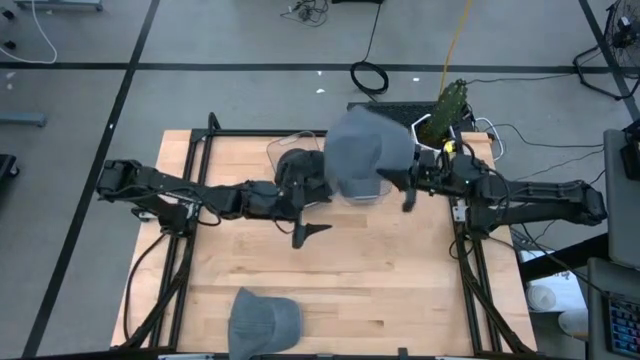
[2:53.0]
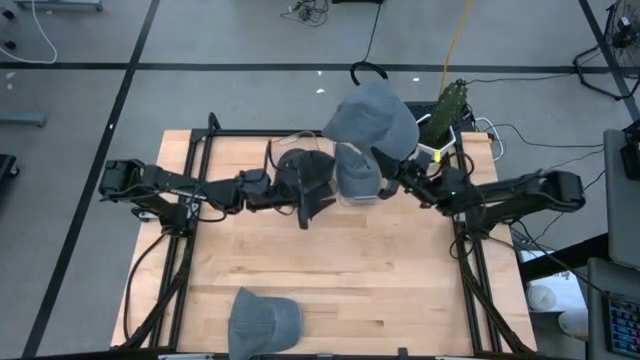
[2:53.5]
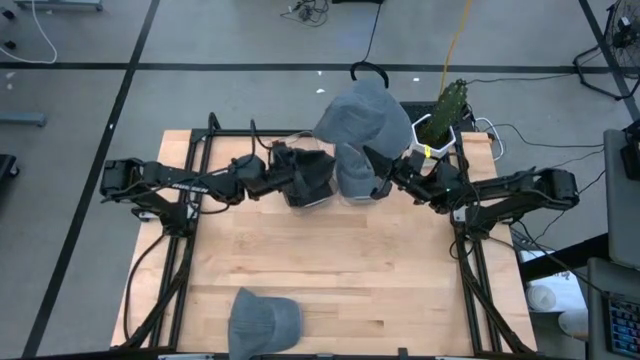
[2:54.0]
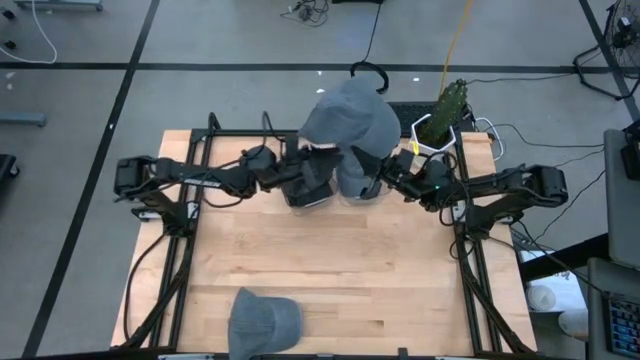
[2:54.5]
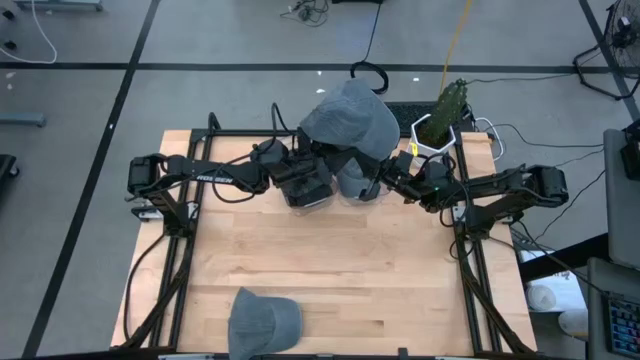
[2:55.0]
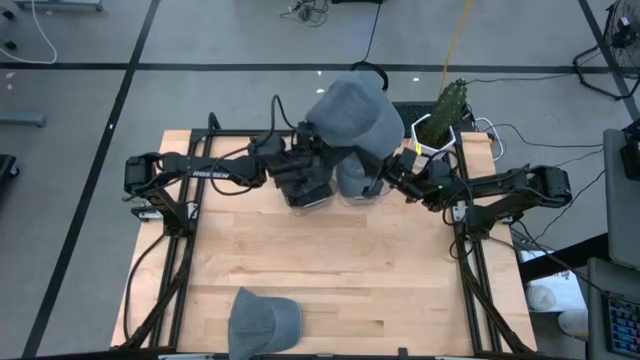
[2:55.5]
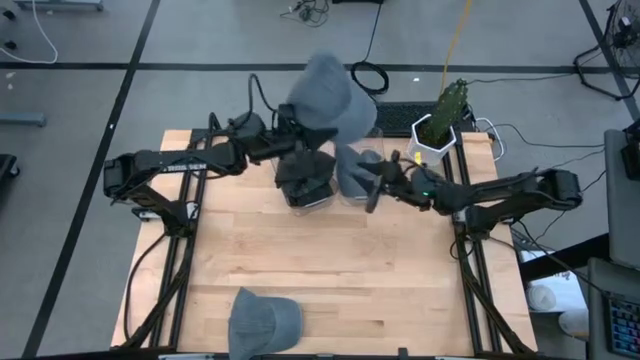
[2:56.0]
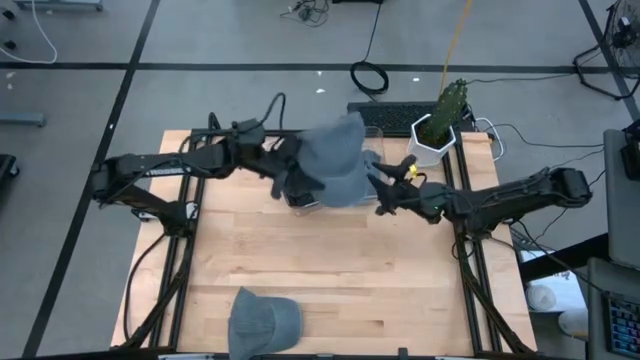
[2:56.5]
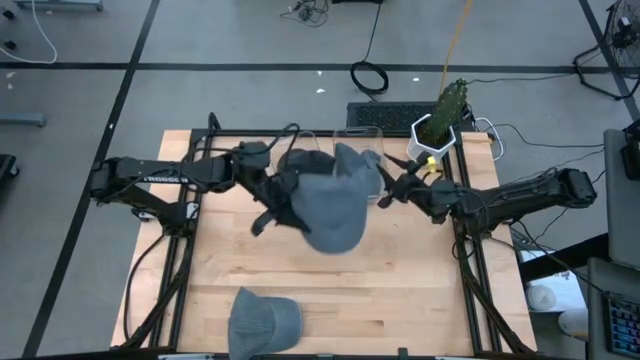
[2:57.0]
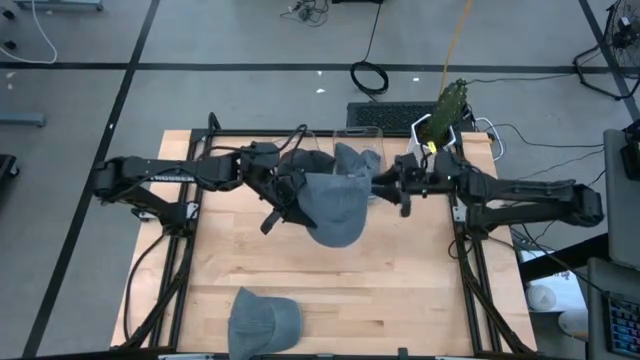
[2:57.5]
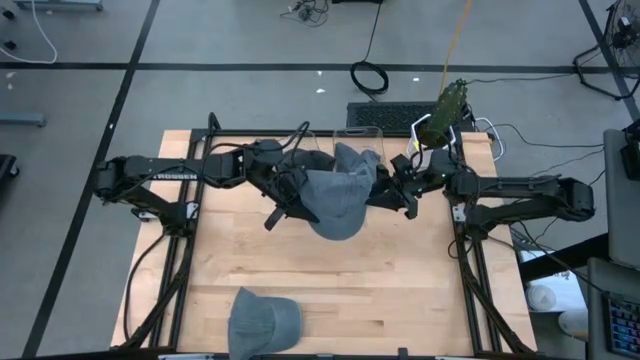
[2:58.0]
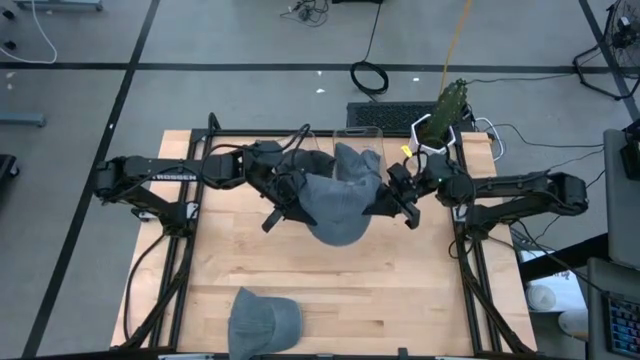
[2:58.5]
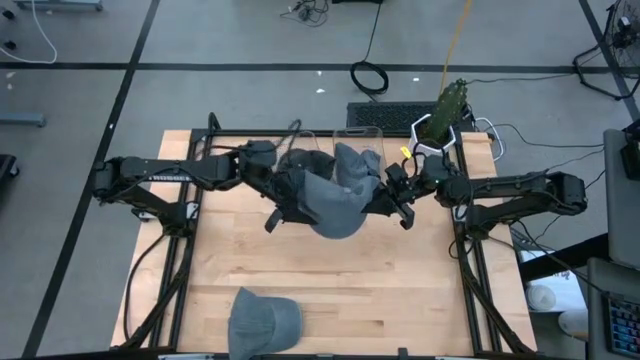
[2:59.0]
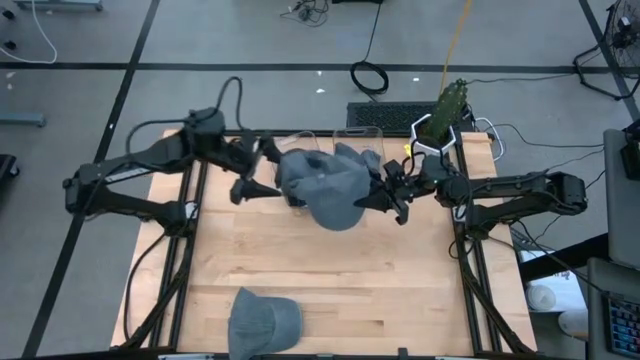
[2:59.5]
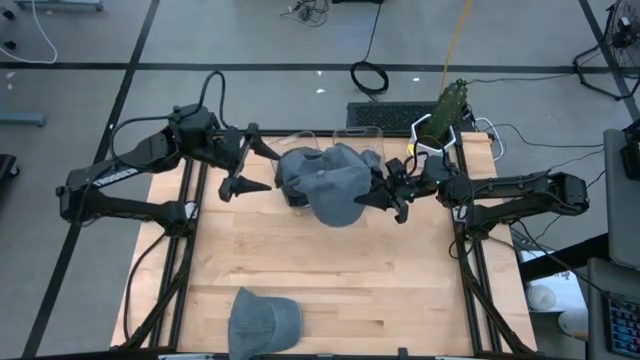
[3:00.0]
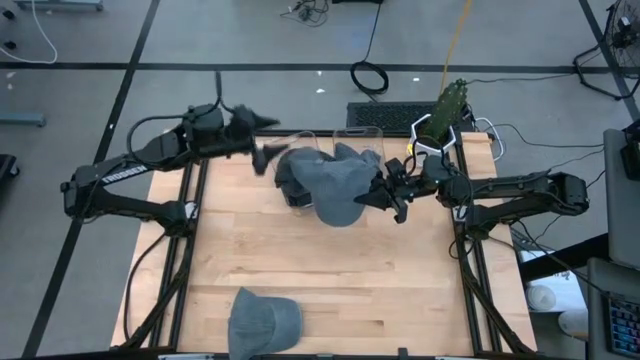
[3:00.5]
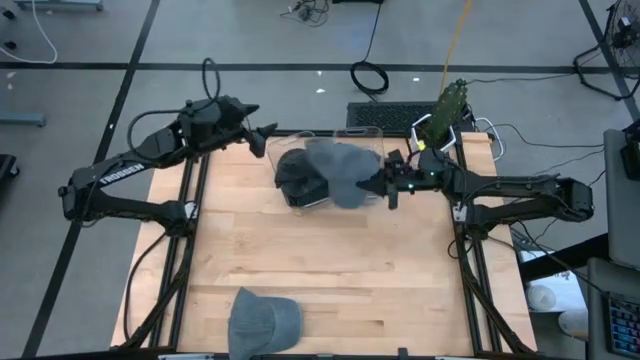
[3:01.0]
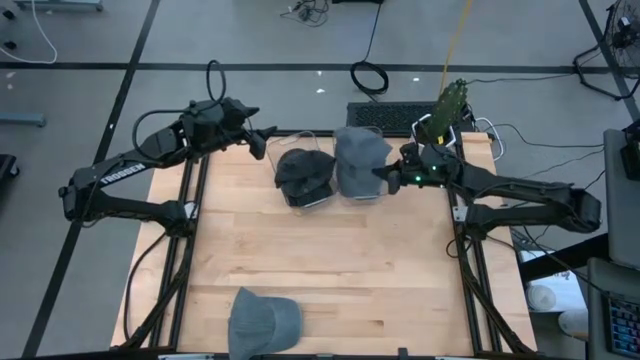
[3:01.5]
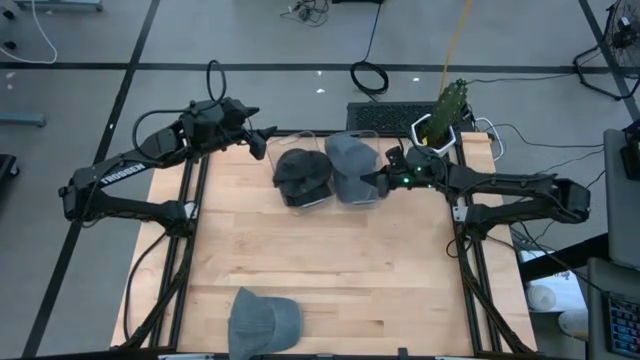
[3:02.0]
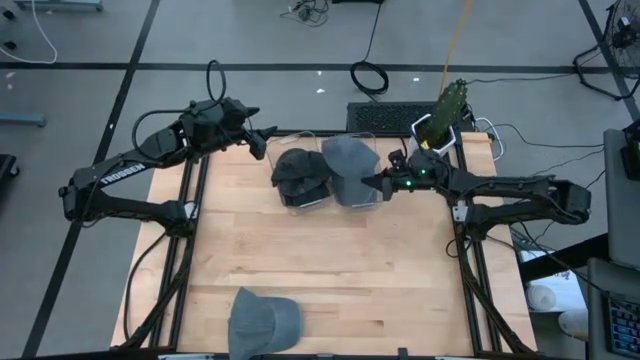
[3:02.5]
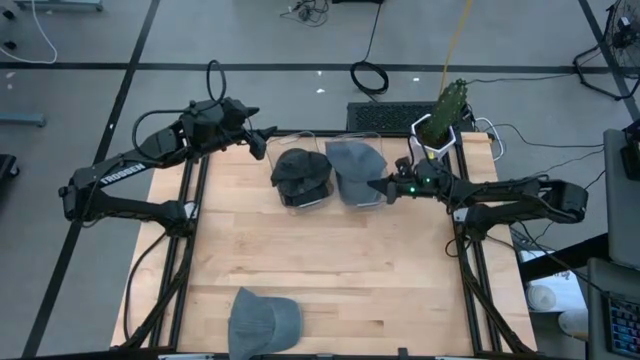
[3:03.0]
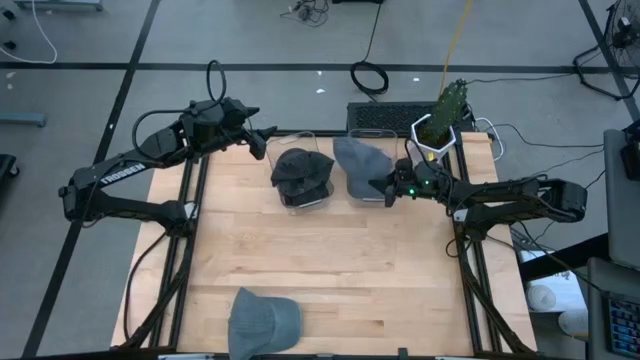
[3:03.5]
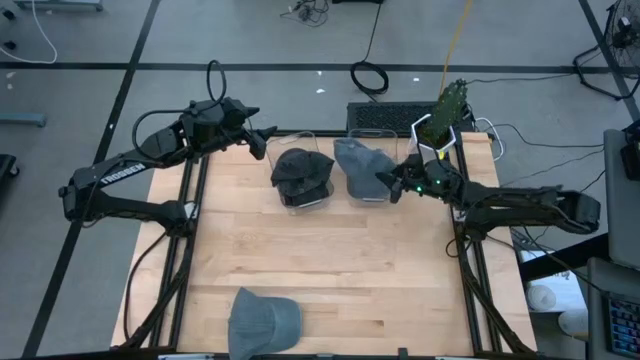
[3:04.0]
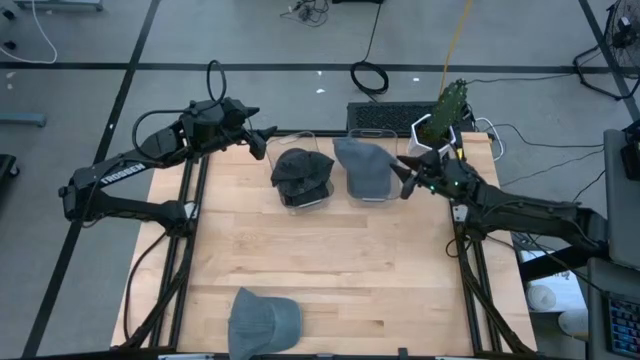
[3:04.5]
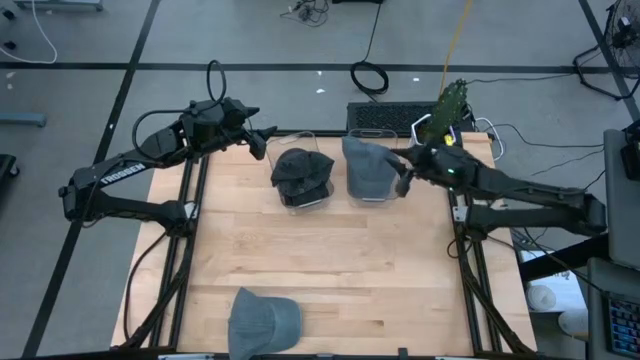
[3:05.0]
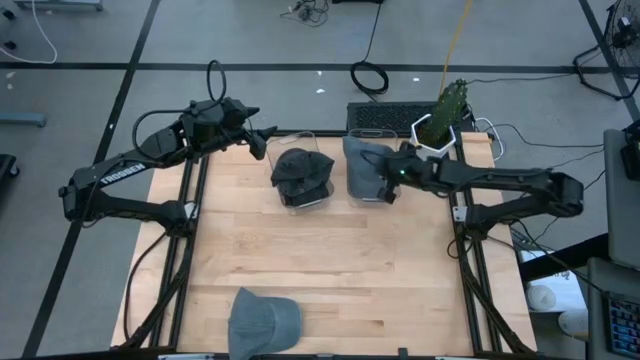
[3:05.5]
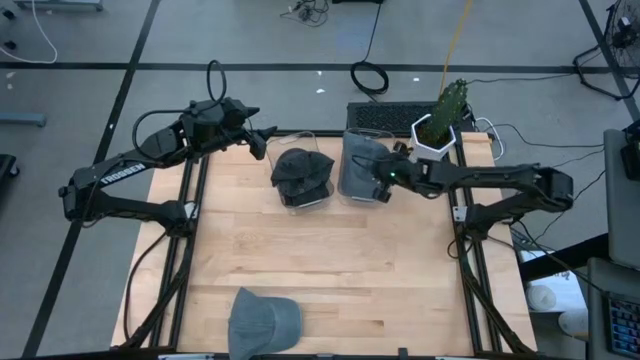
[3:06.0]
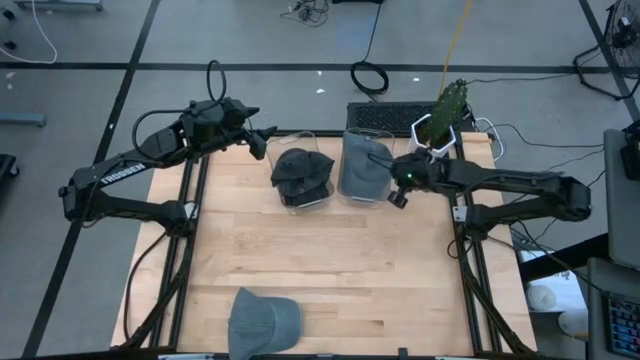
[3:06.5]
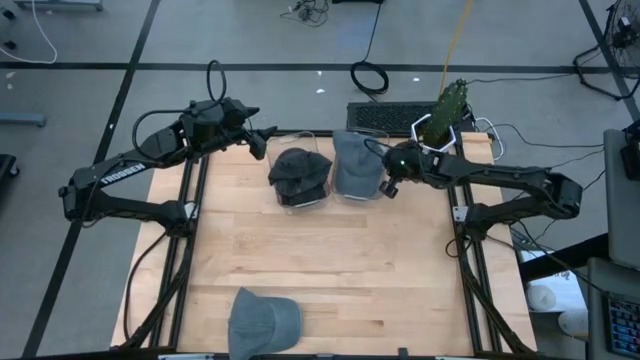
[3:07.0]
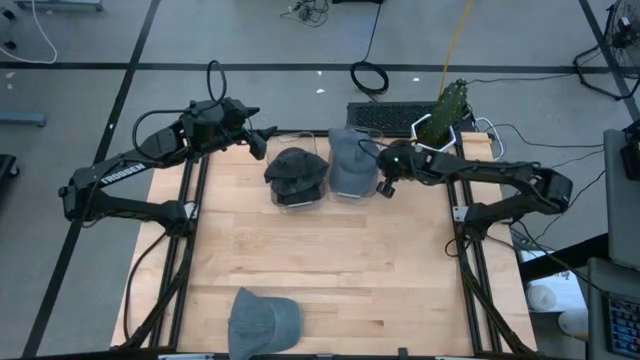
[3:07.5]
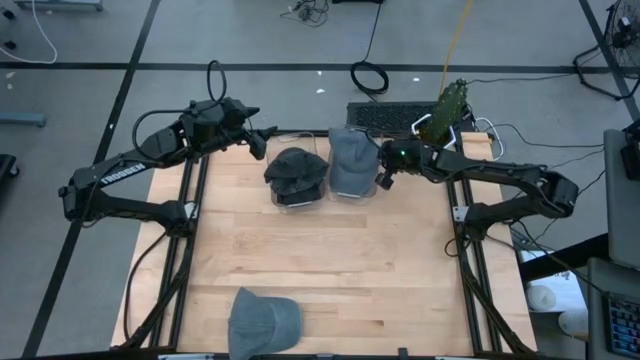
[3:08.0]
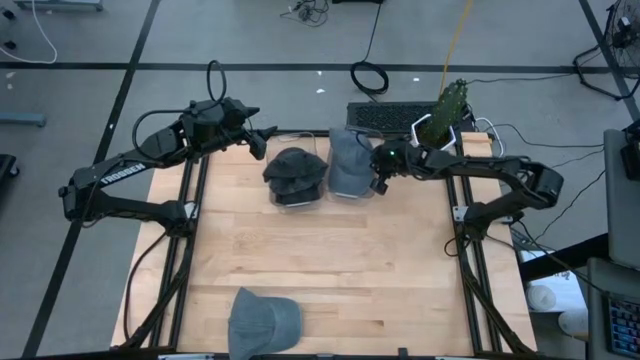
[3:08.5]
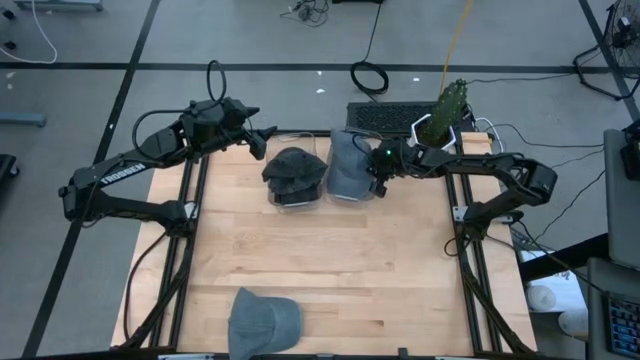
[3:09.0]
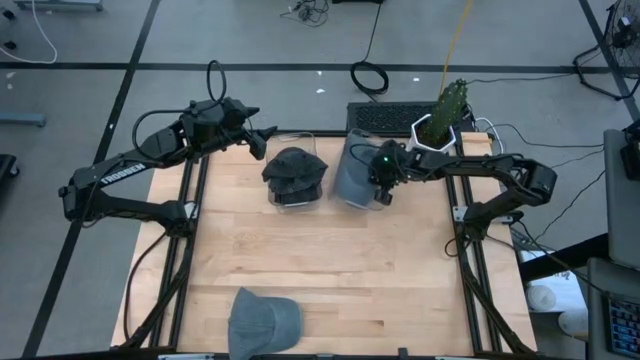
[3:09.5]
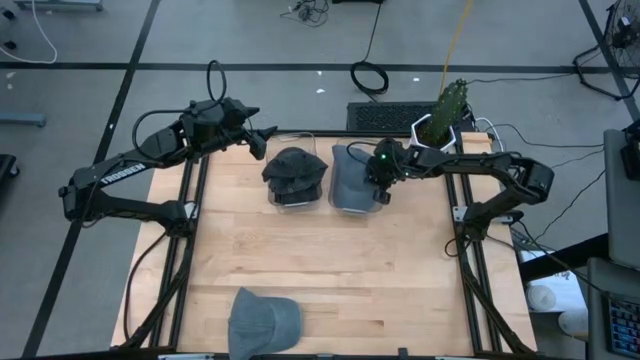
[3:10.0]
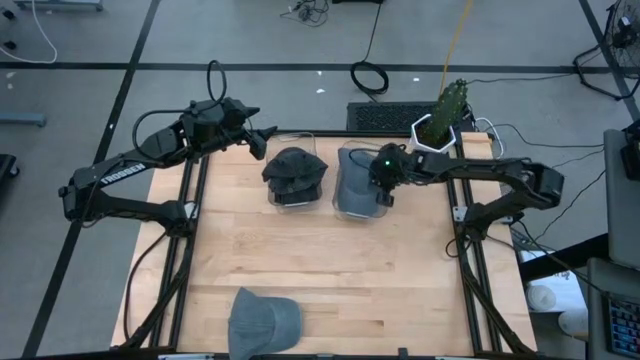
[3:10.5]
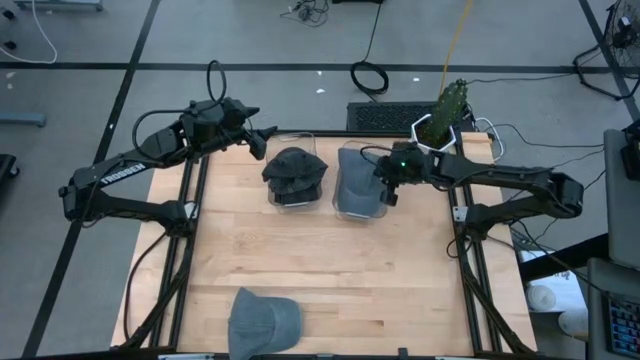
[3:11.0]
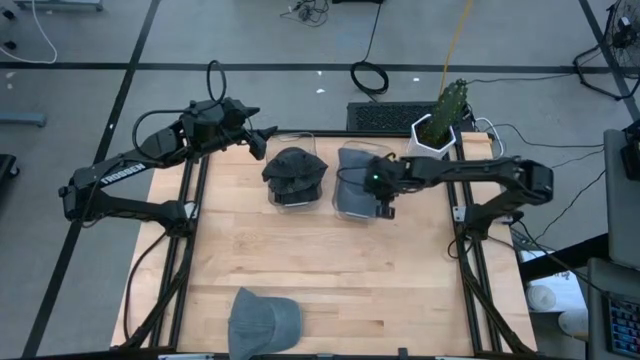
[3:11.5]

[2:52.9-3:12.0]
Task: Pick & Place hat
Put the top gray cap into the right transparent bin

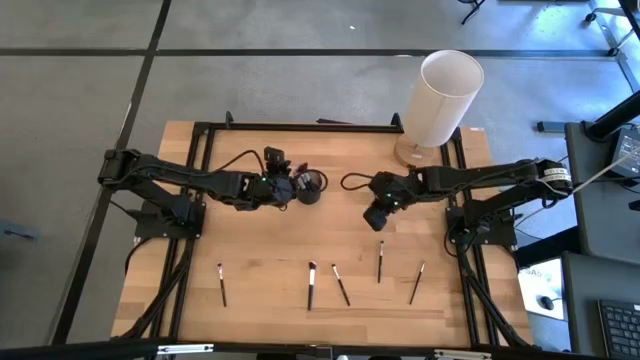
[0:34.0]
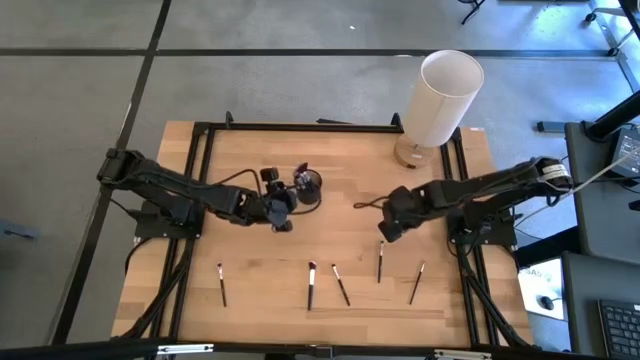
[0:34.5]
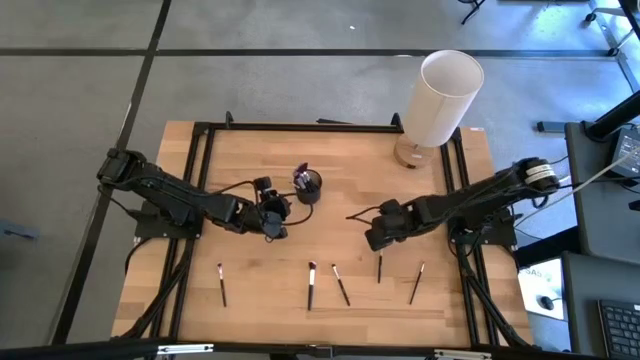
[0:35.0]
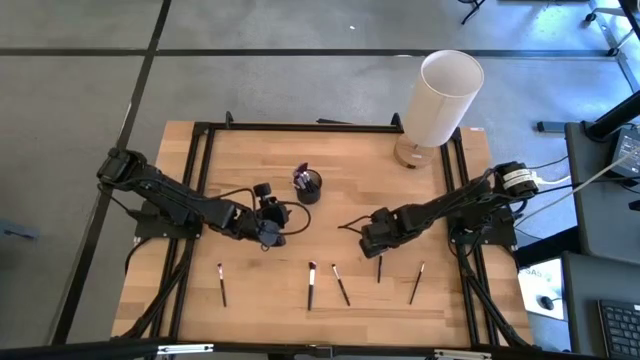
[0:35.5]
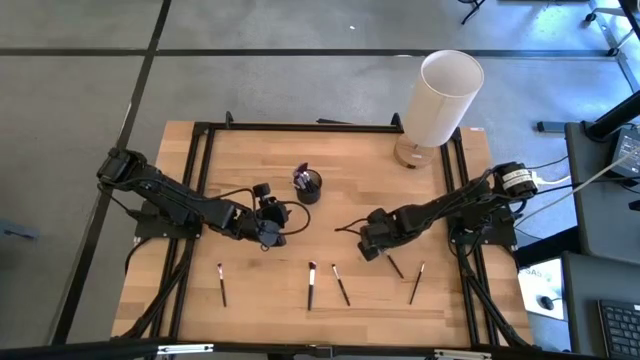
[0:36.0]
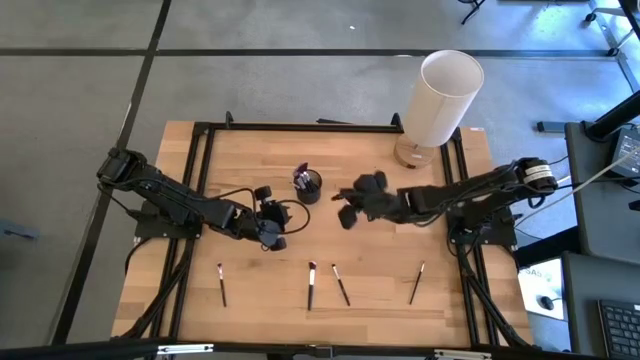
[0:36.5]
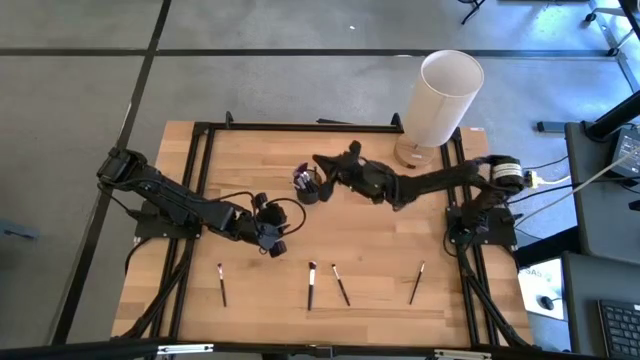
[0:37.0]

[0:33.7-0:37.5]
Task: Put items in baskets/containers
Put the black eyeshadow brush into the black pen holder
